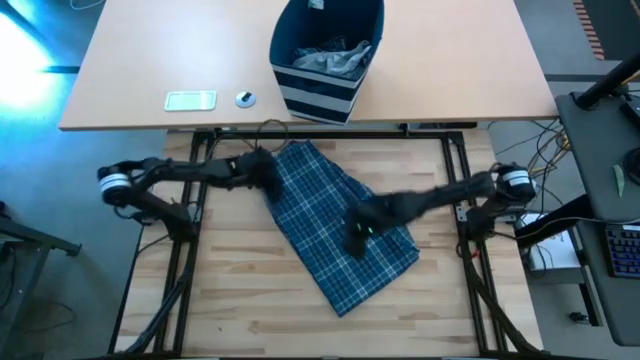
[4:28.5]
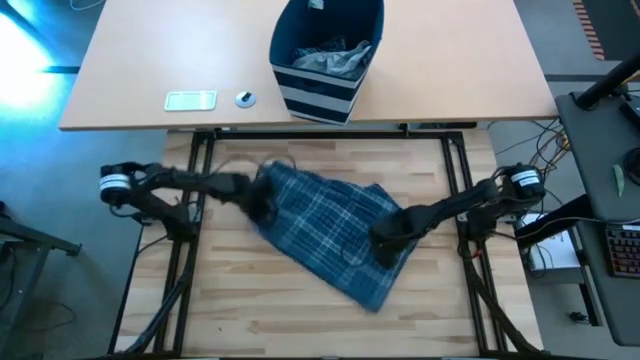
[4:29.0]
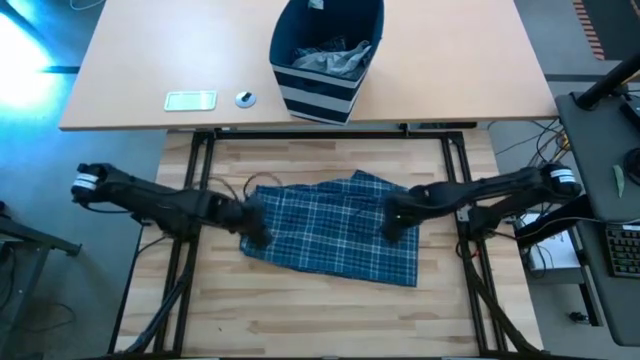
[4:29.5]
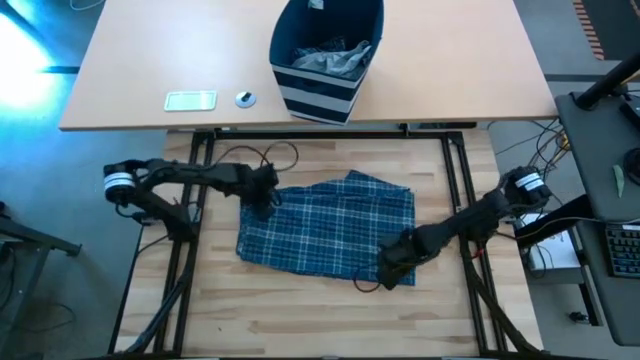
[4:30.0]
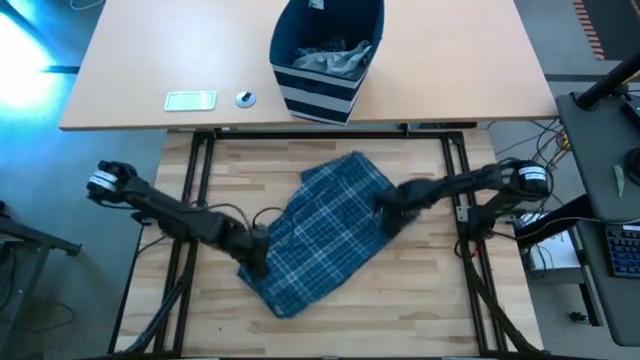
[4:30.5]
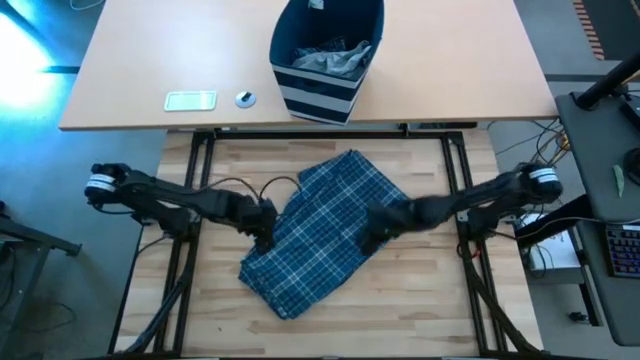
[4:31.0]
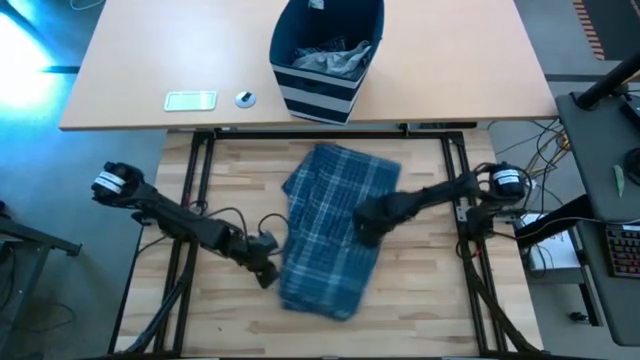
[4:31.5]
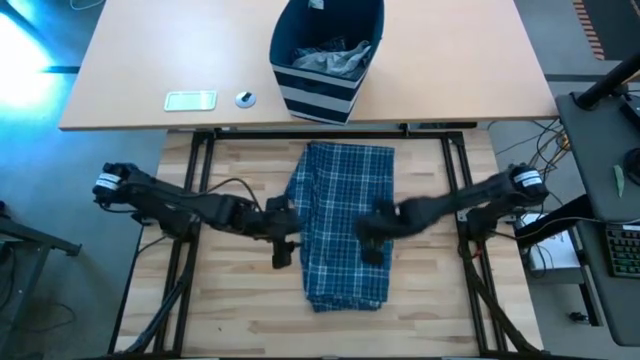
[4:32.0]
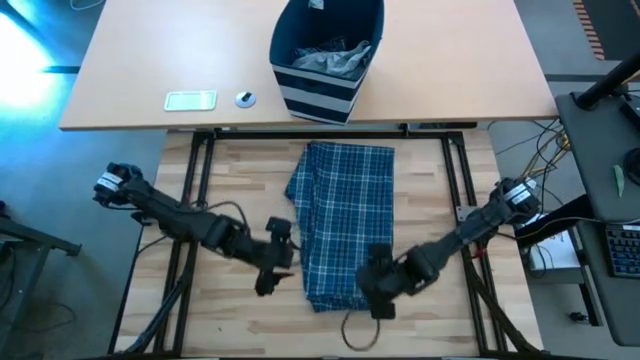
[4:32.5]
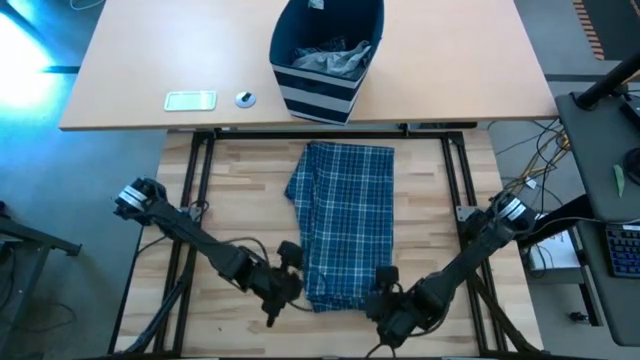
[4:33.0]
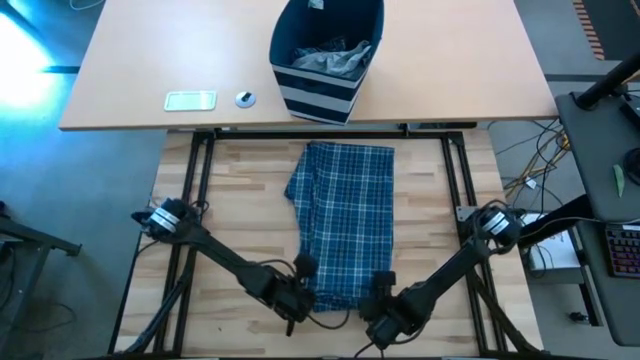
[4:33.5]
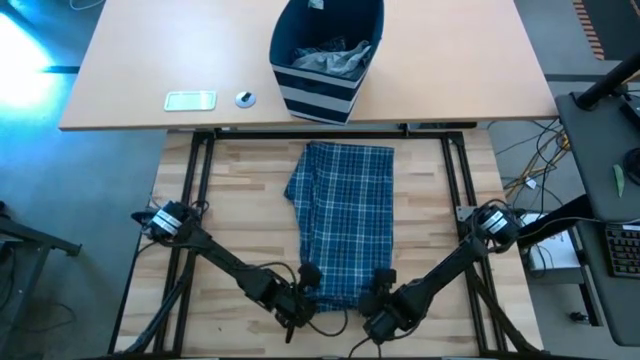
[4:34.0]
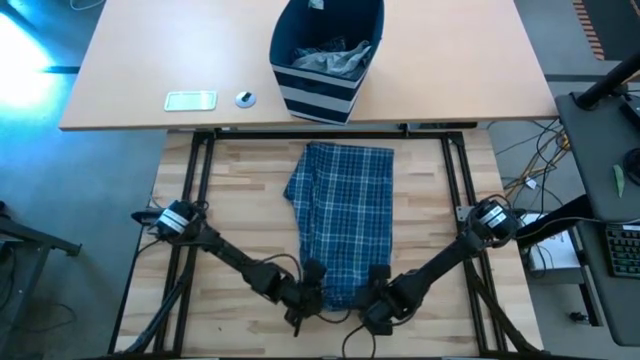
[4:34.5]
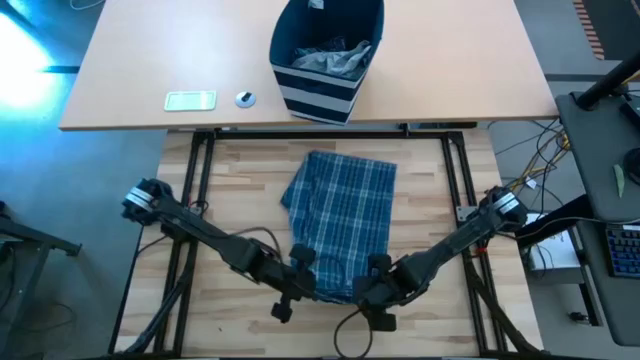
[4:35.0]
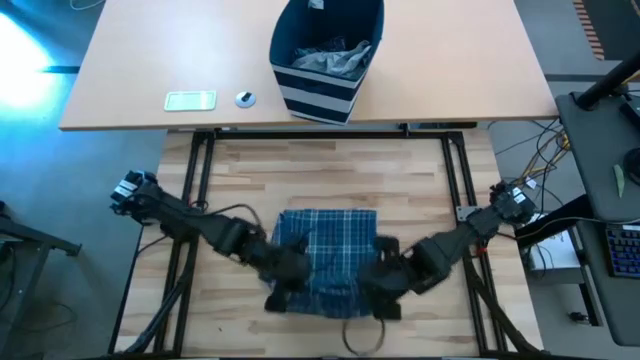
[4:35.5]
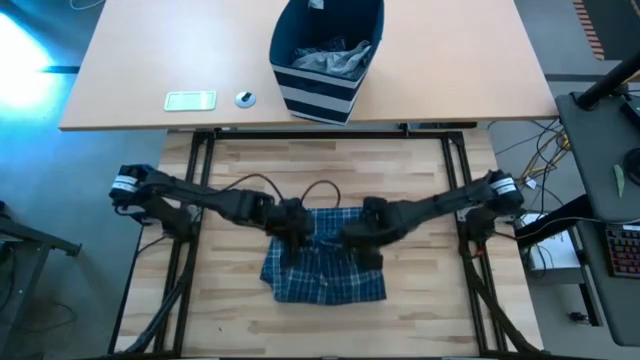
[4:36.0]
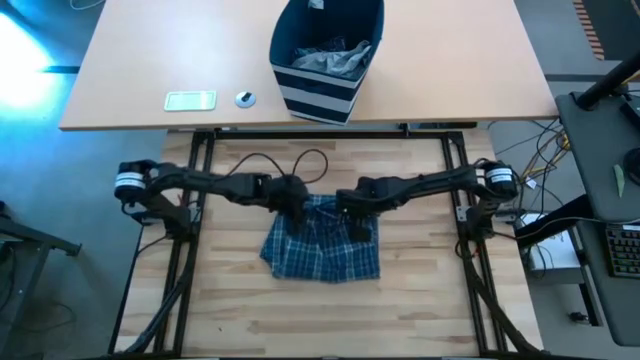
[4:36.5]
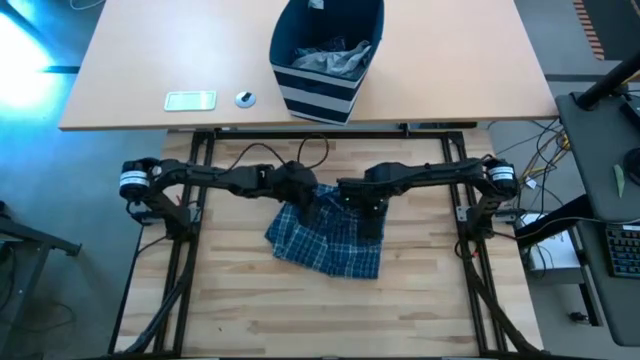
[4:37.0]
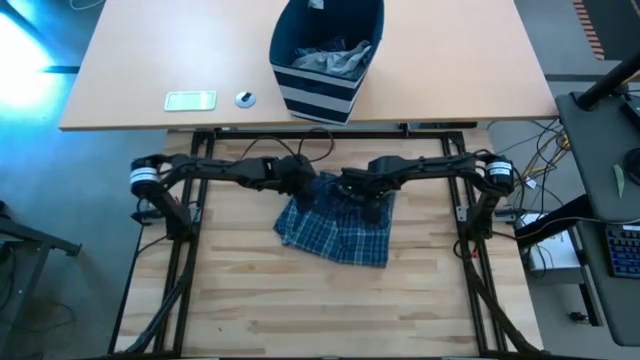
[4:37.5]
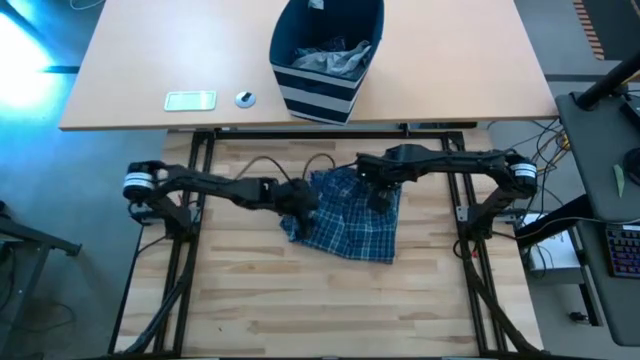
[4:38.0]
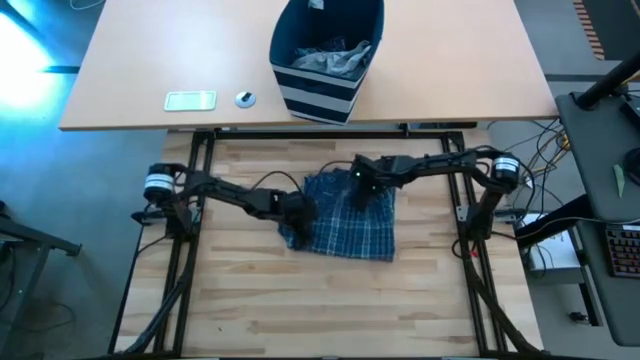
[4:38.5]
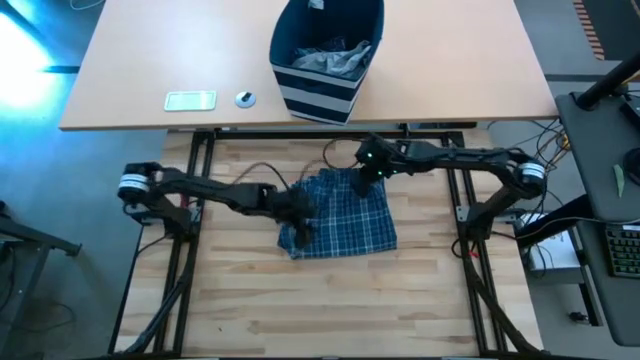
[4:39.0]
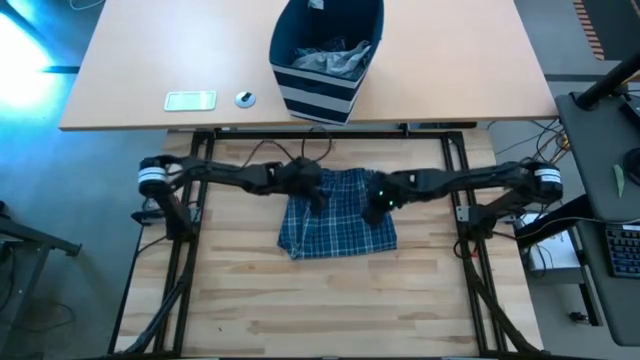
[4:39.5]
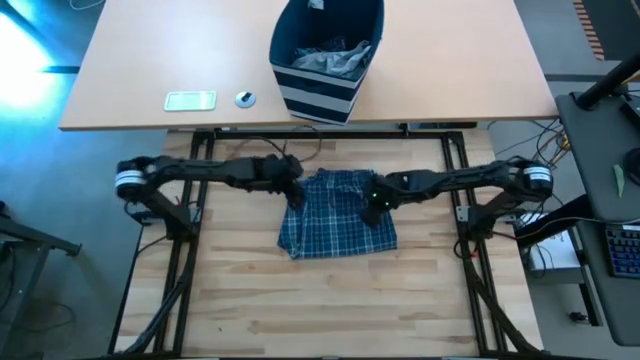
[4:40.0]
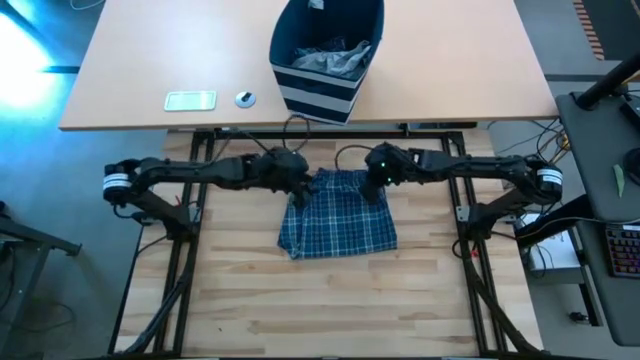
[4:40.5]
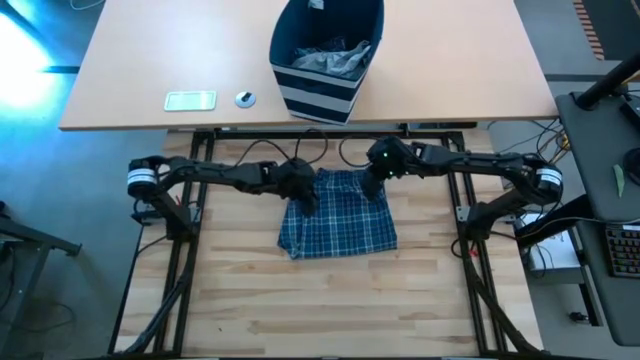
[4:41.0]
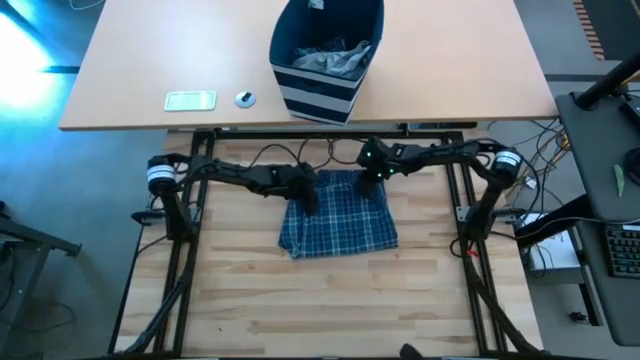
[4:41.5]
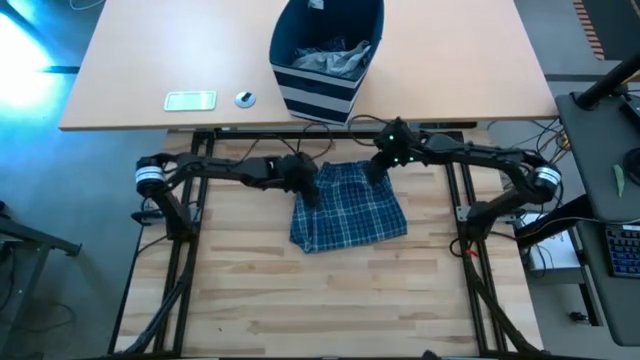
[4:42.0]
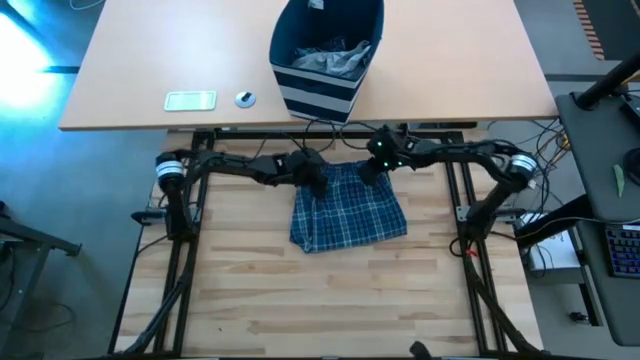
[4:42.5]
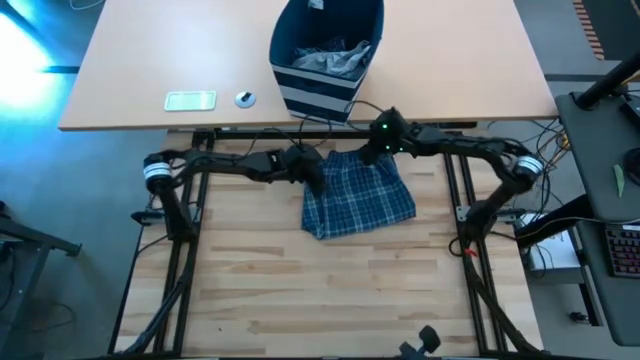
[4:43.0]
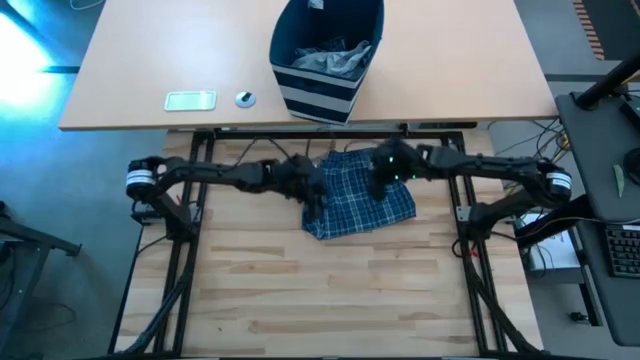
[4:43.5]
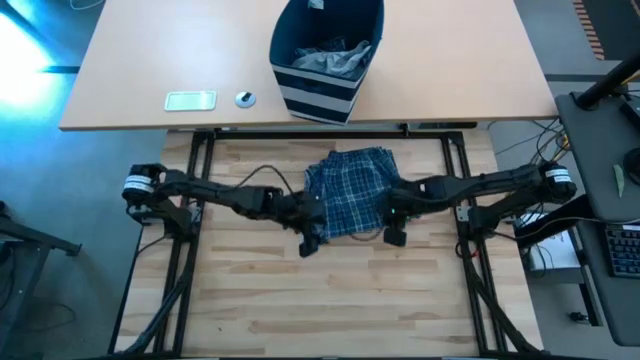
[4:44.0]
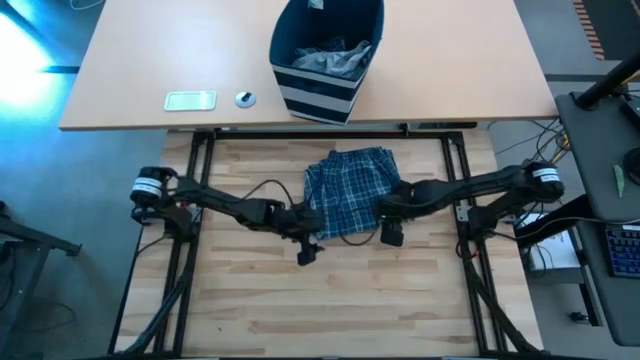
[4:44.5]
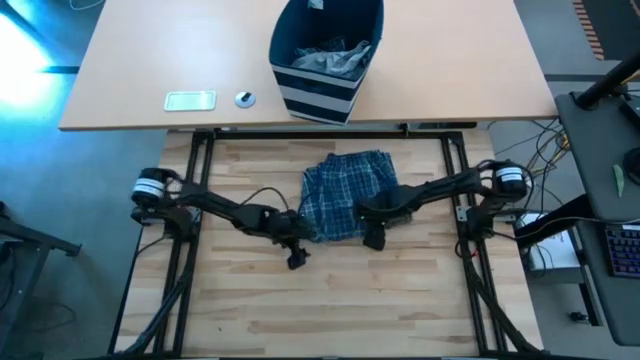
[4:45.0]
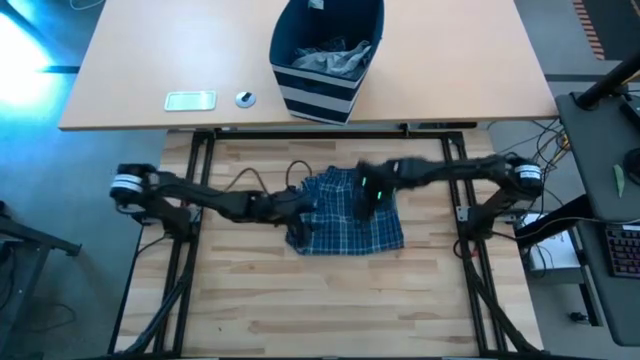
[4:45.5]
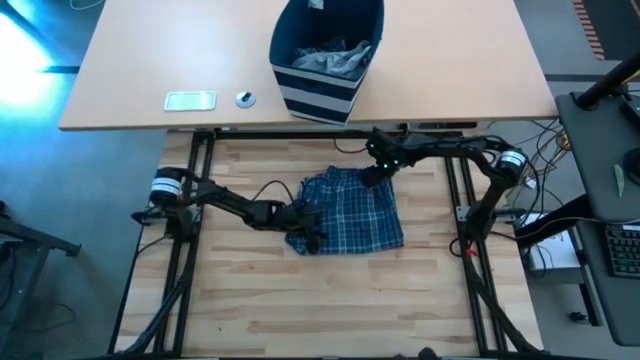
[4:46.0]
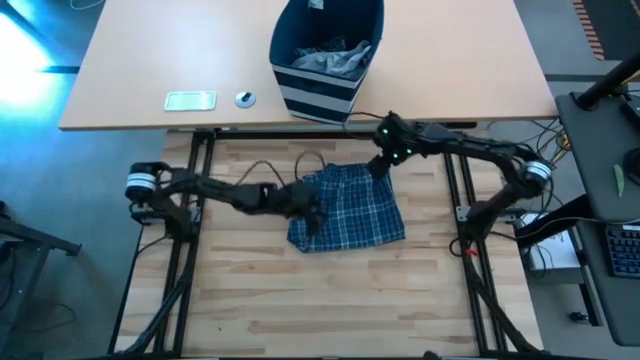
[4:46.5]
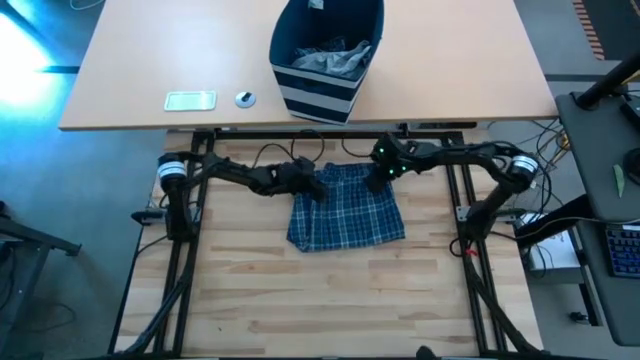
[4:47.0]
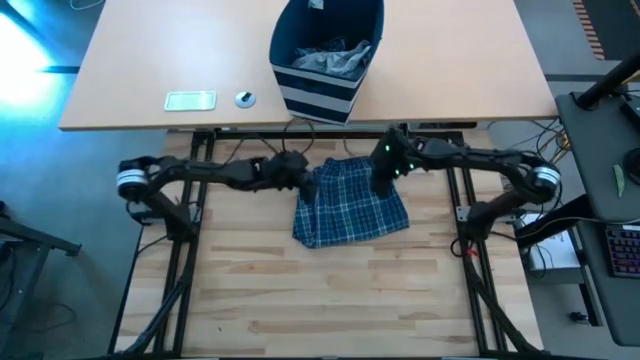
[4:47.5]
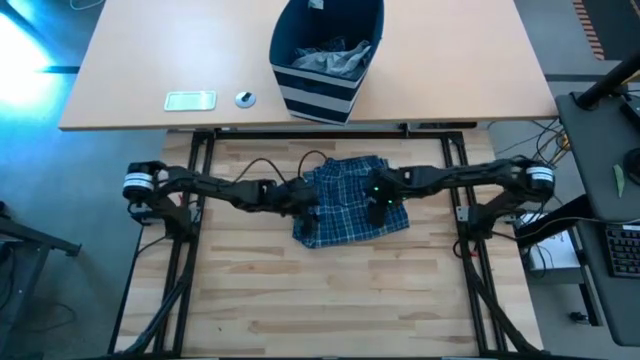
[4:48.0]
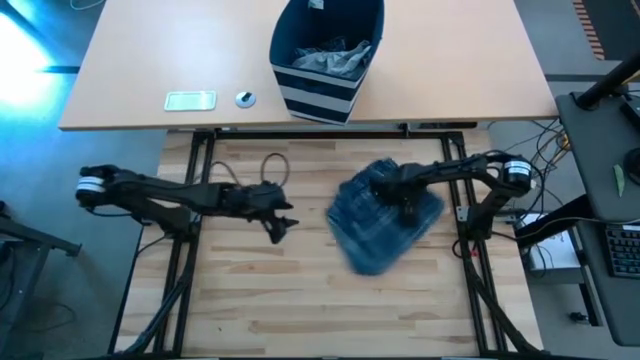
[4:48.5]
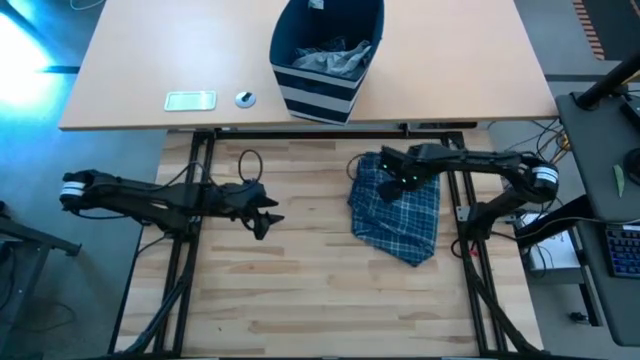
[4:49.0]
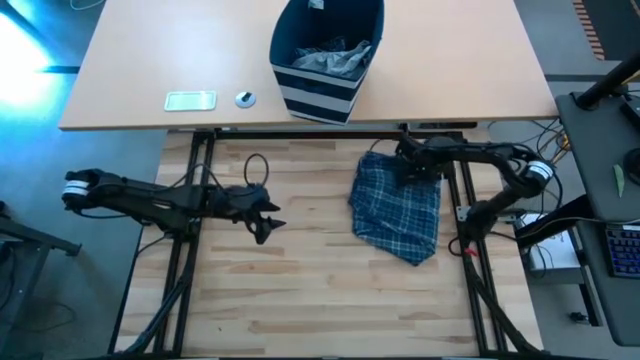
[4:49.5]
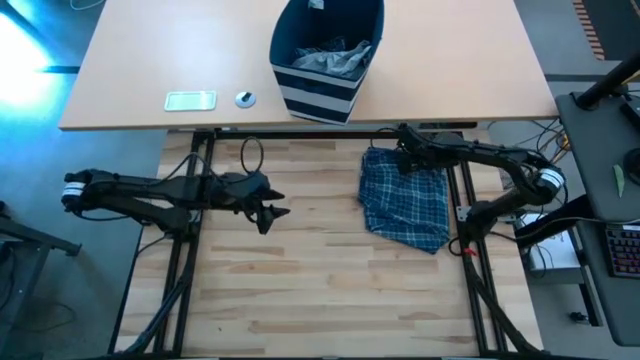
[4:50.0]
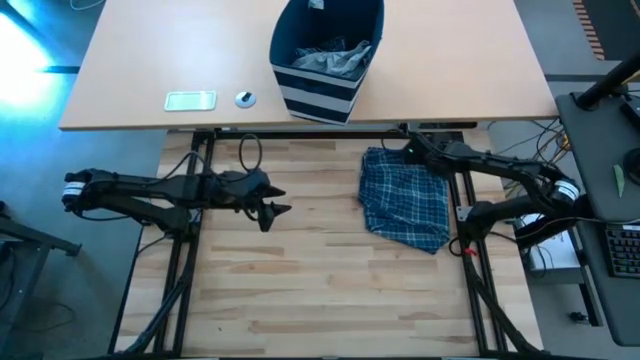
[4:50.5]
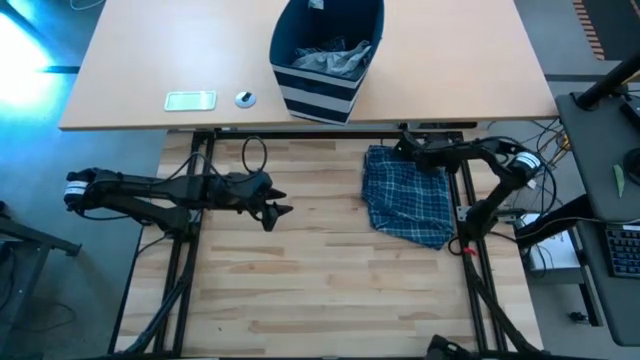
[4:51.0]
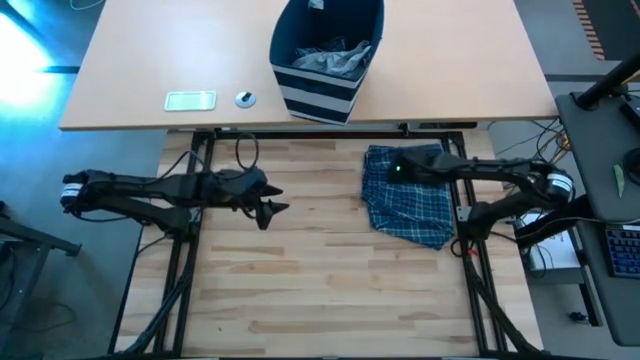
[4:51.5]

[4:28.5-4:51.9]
Task: Fold Laundry from Bin
Fold the blue patterned pants
